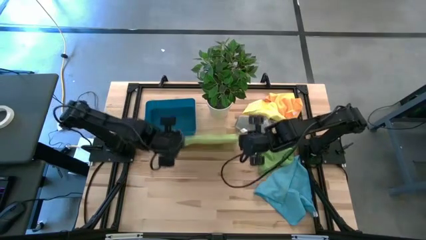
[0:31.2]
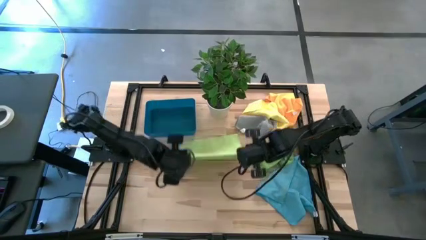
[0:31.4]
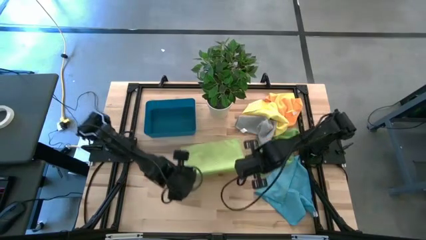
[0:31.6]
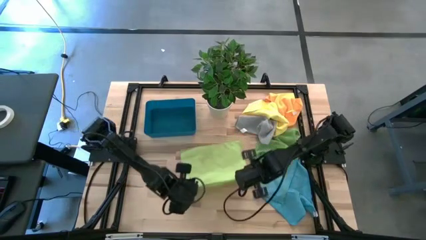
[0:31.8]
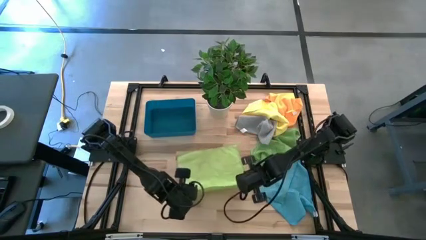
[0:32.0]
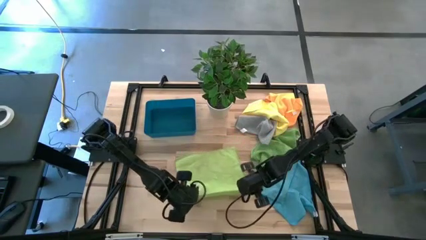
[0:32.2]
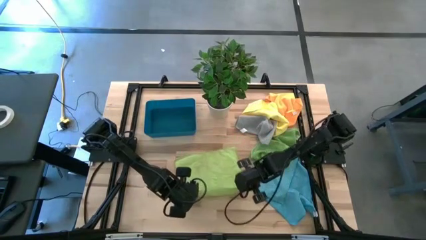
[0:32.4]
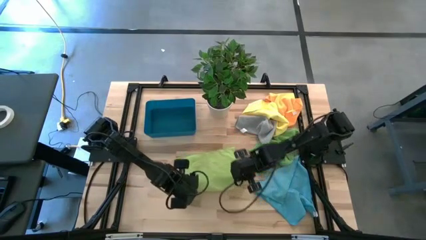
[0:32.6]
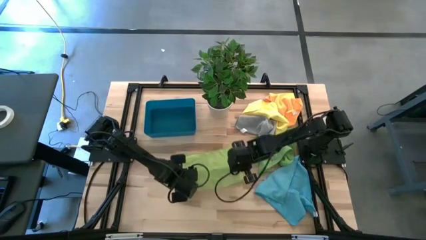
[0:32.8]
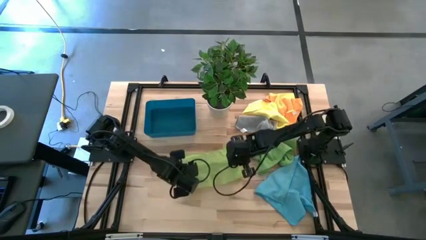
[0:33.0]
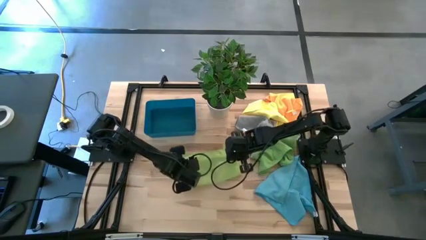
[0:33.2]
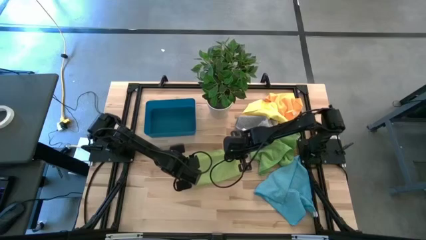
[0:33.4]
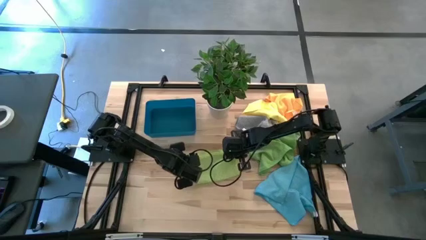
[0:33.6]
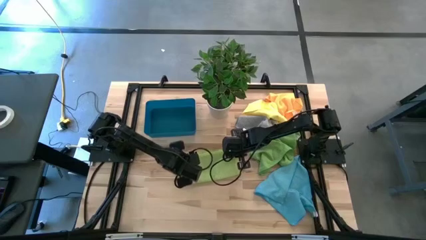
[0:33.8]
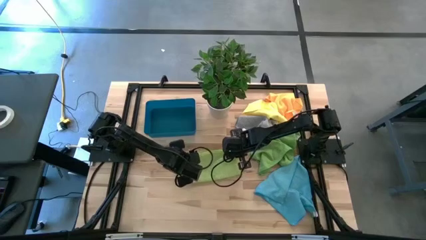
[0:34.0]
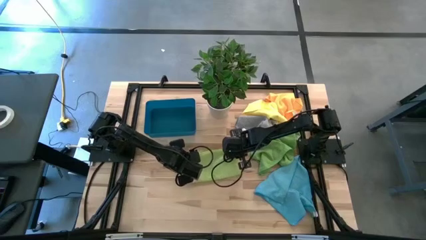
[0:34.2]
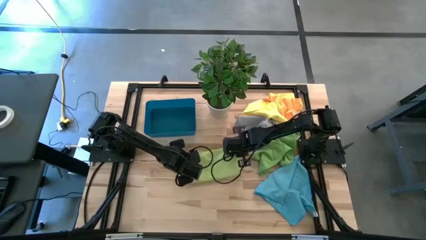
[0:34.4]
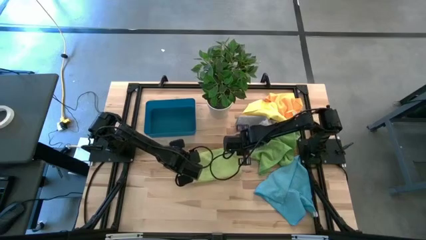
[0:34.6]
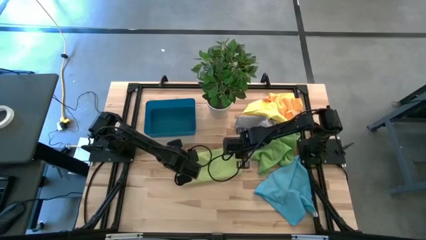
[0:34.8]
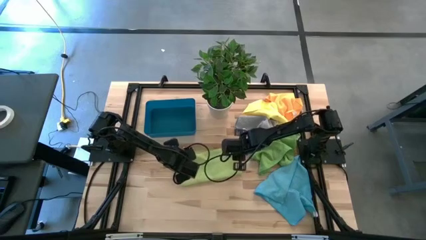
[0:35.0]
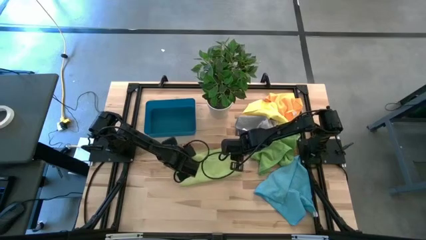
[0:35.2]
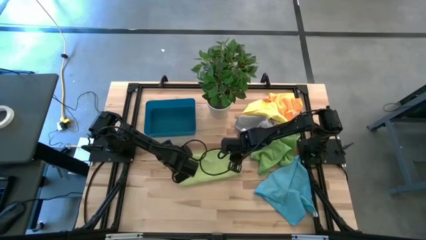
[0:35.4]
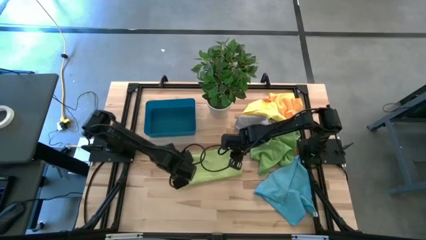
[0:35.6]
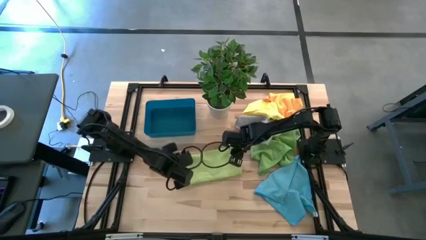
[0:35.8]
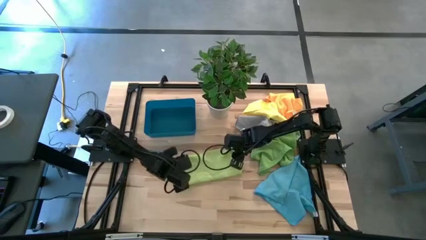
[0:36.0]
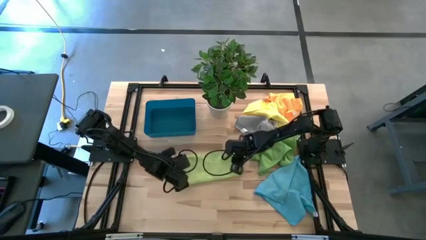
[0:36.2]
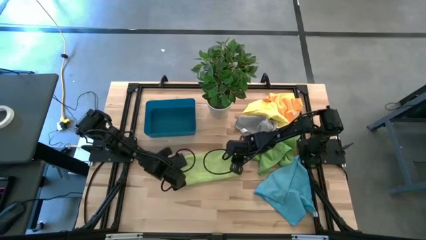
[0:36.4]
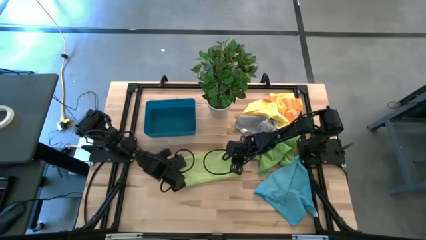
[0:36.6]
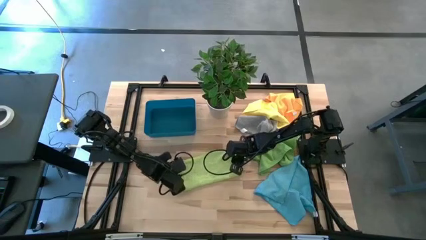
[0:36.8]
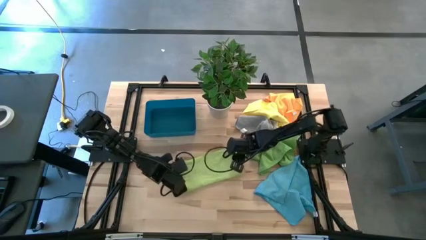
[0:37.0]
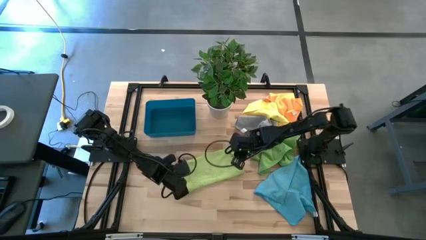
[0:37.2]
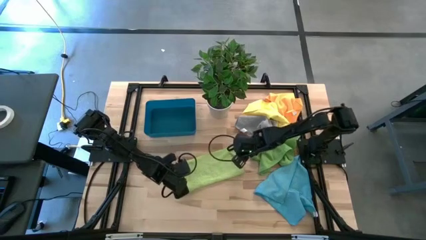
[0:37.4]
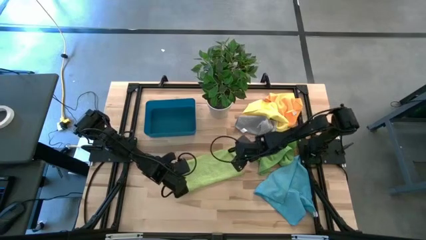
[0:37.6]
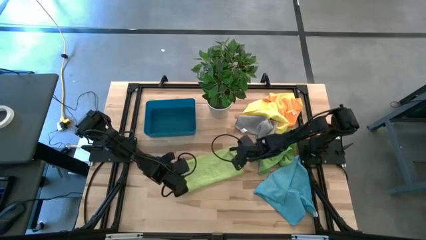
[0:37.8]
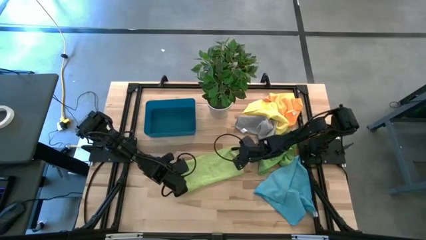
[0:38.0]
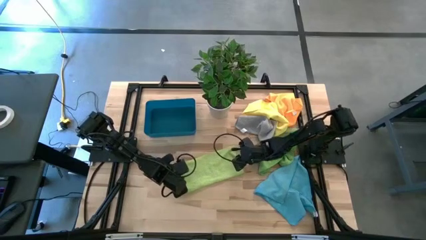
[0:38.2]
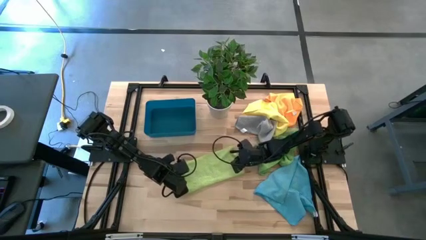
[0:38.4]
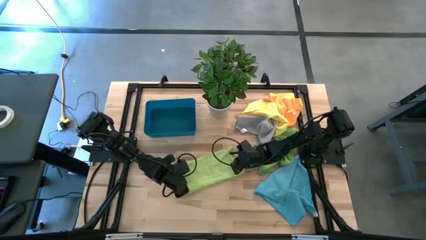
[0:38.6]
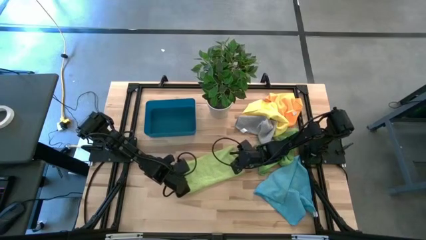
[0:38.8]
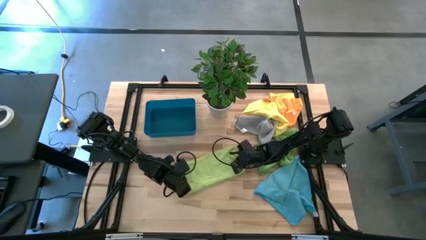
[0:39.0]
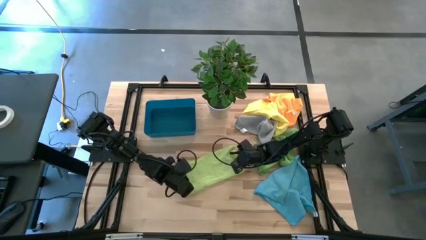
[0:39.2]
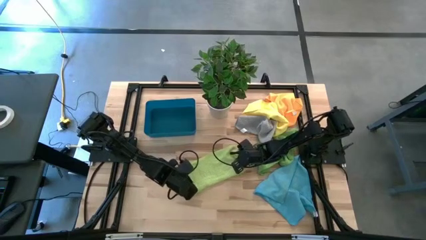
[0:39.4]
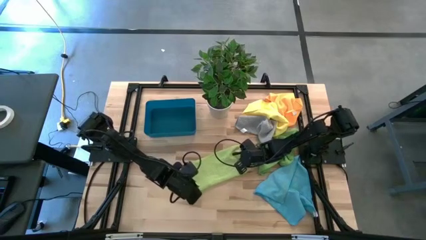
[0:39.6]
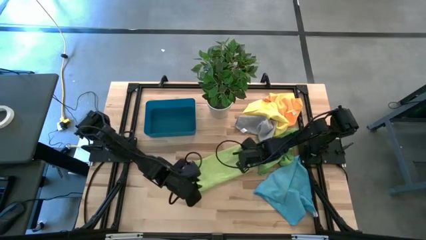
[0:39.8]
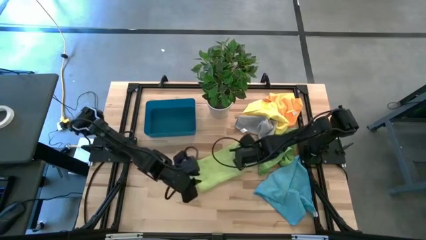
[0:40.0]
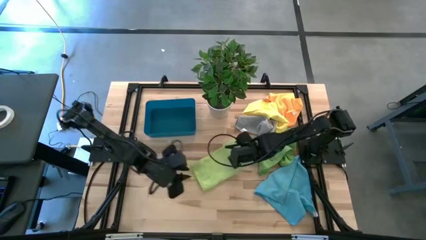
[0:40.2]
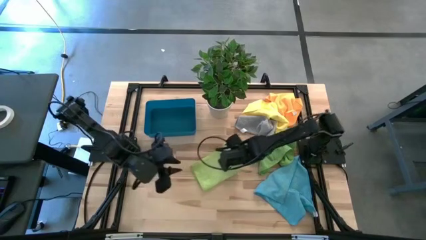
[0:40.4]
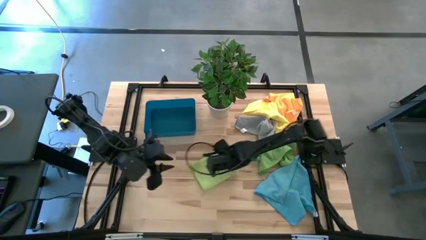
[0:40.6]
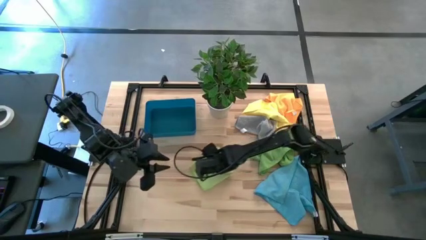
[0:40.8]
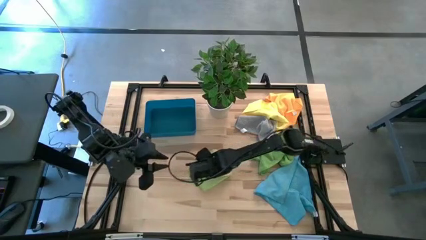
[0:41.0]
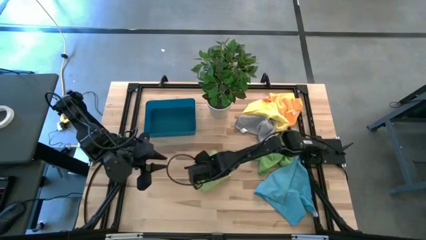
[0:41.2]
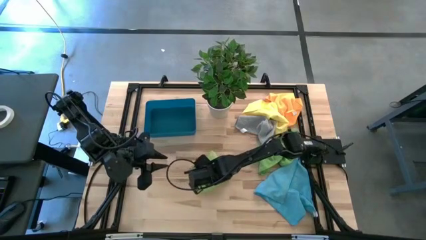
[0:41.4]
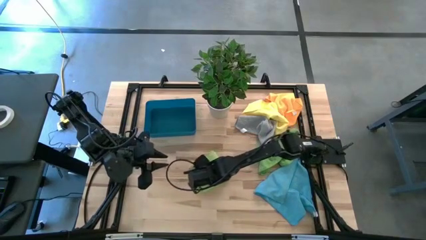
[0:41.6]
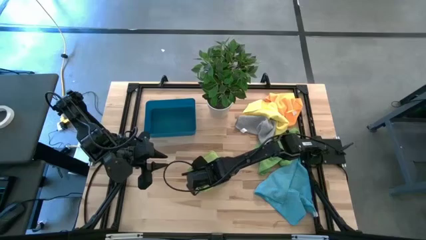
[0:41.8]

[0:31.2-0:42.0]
Task: Fold microfiber towels
Fold the light green towel
